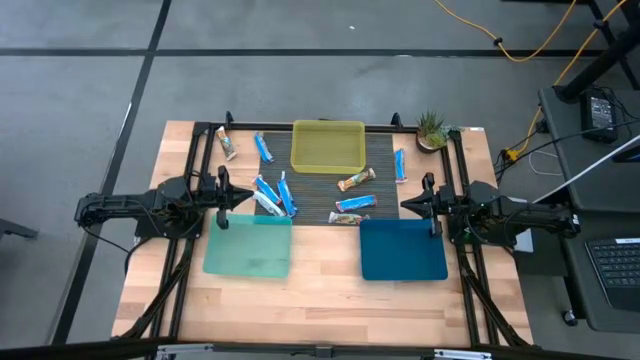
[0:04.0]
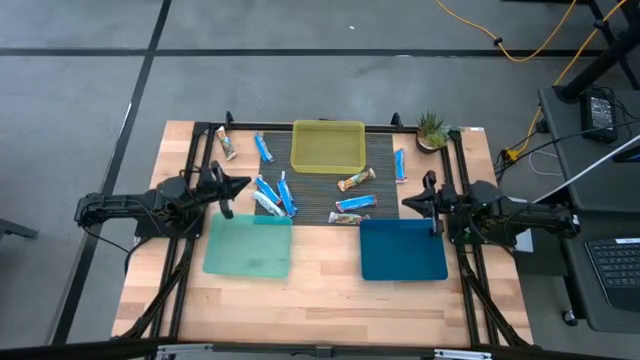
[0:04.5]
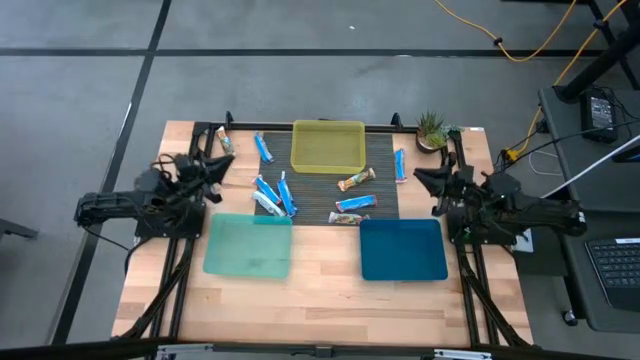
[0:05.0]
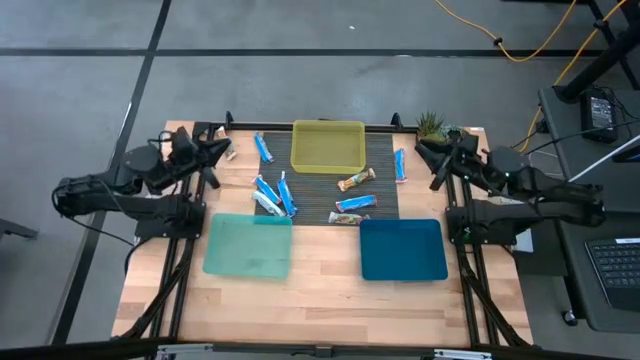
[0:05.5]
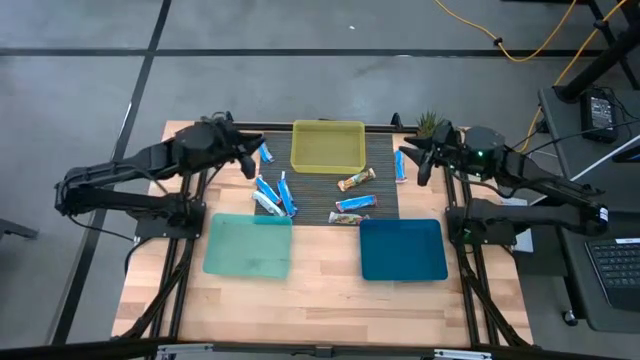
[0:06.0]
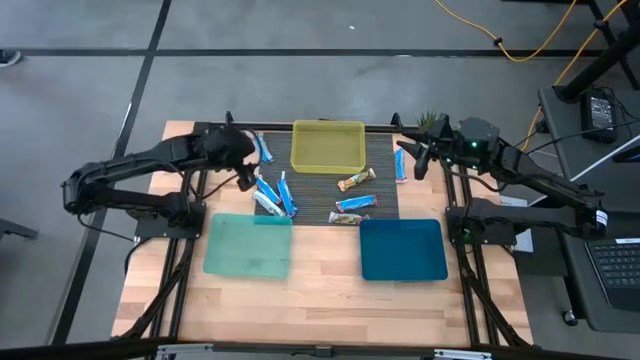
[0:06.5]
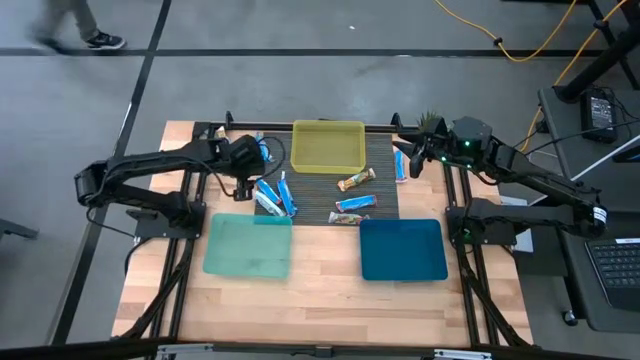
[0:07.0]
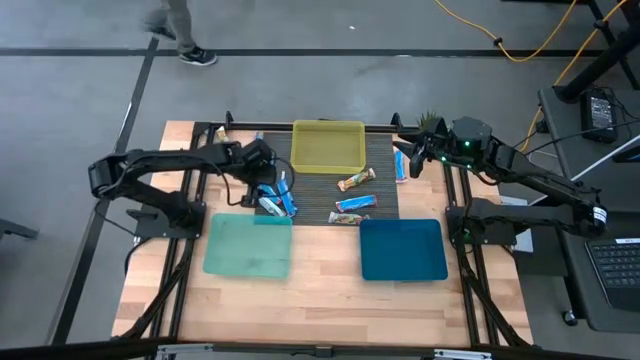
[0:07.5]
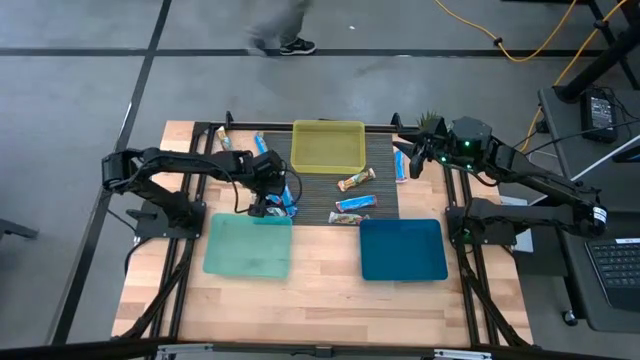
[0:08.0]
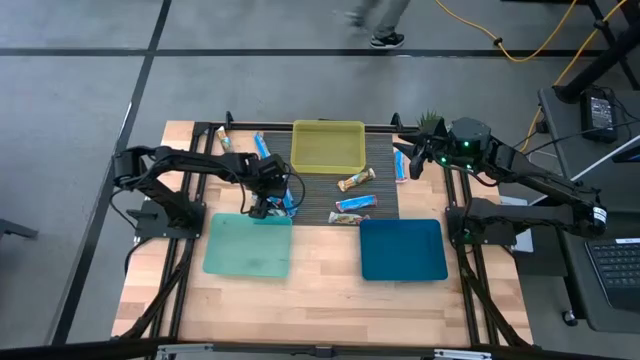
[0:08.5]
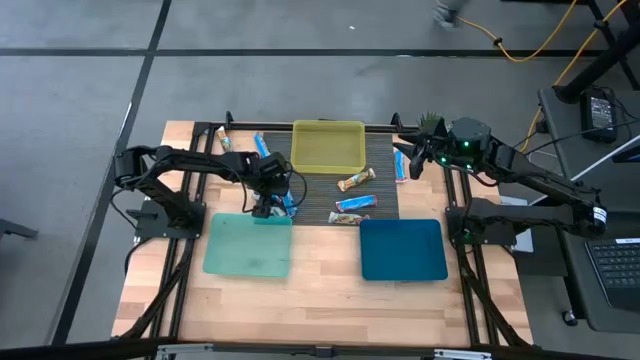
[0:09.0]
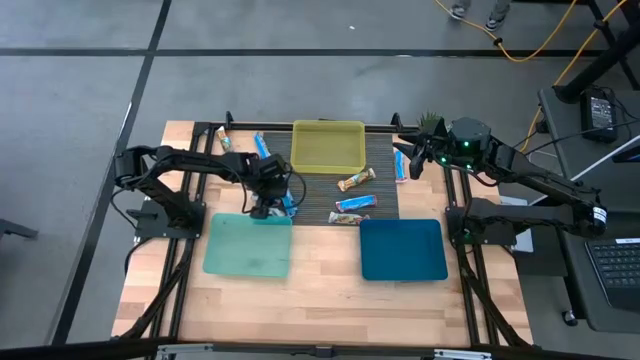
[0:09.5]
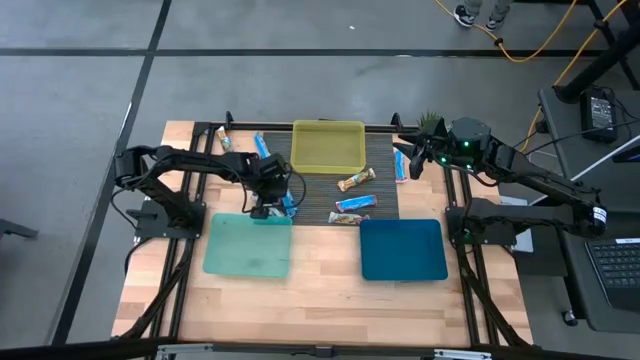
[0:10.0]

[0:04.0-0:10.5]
Task: Pick and place Granola Bars by type
Put the red granola bar into the green bin

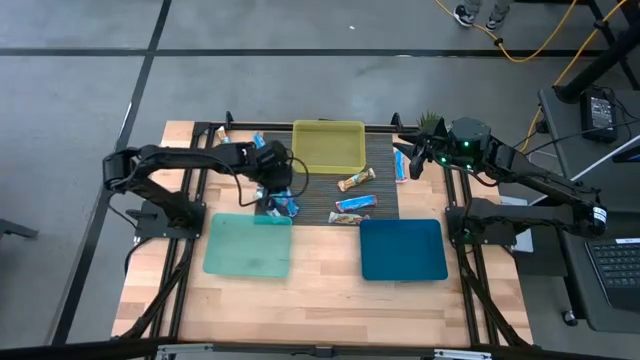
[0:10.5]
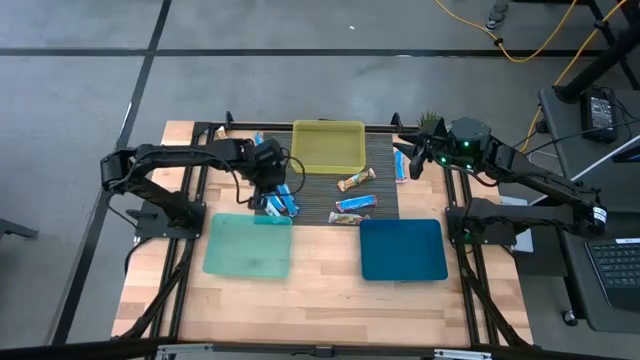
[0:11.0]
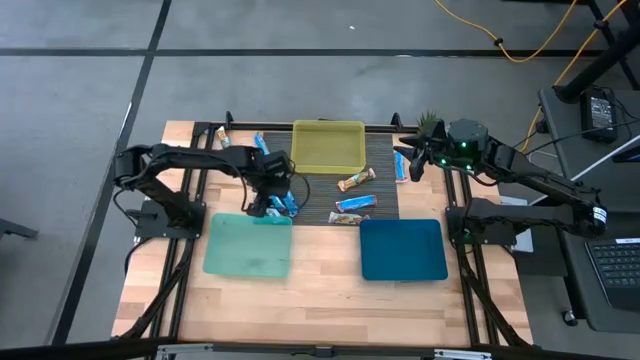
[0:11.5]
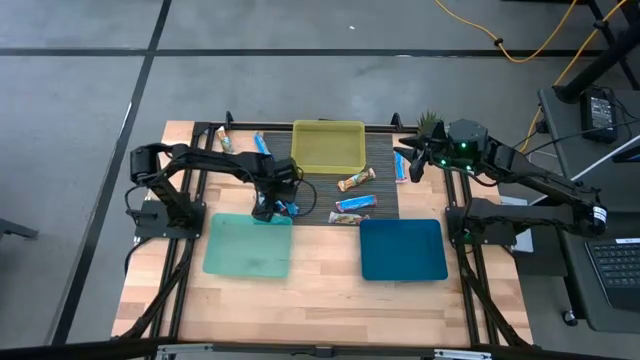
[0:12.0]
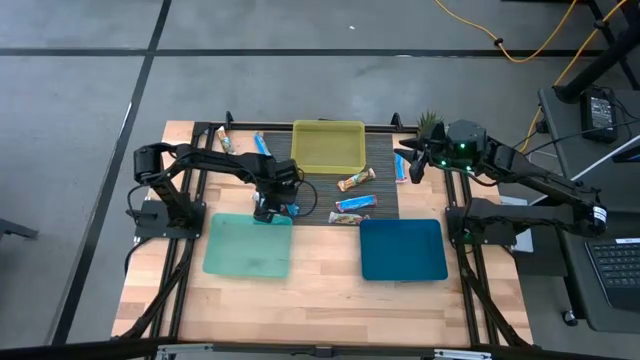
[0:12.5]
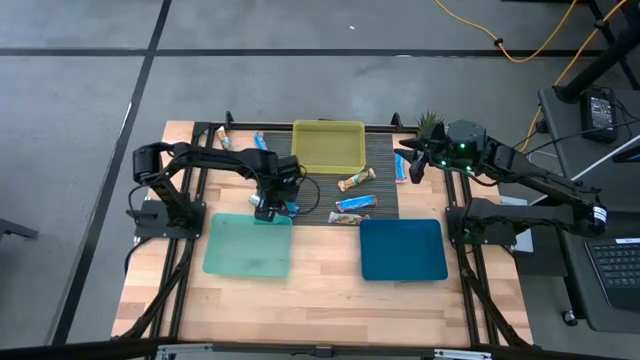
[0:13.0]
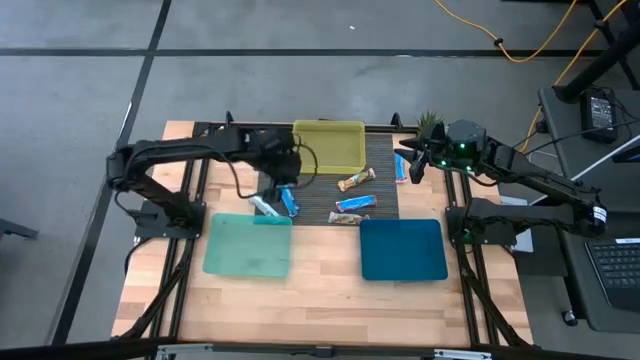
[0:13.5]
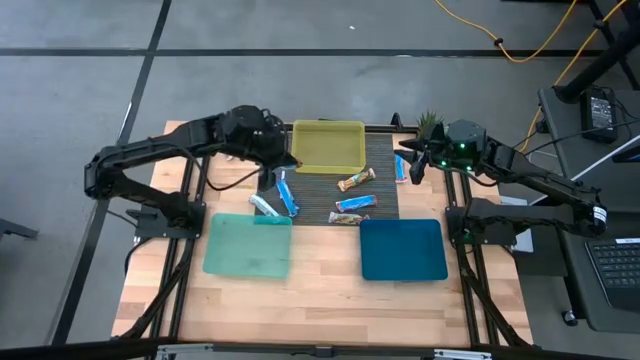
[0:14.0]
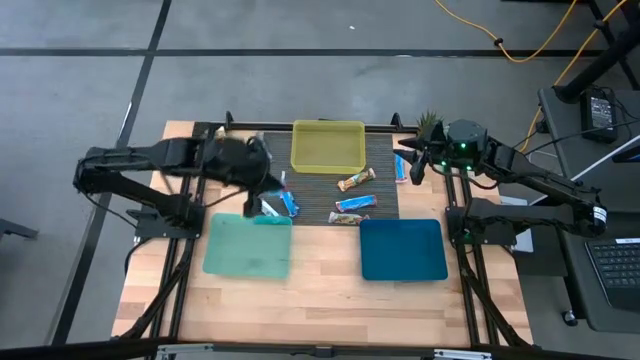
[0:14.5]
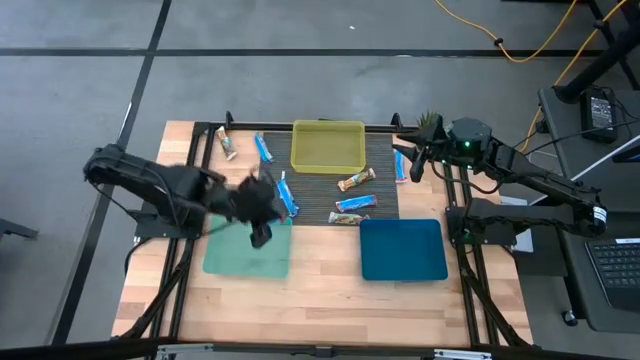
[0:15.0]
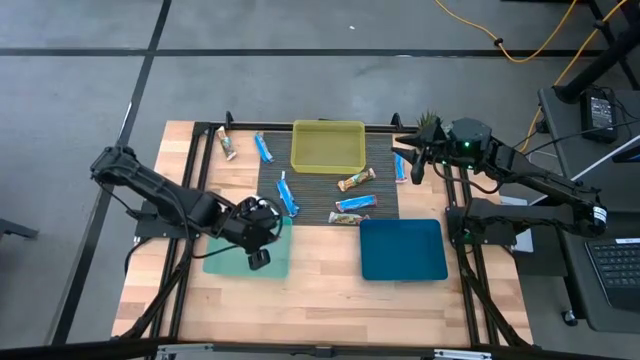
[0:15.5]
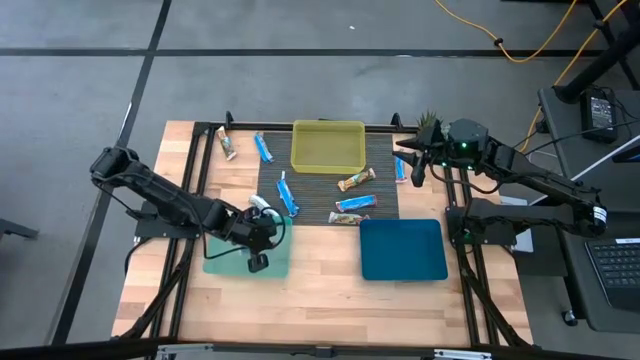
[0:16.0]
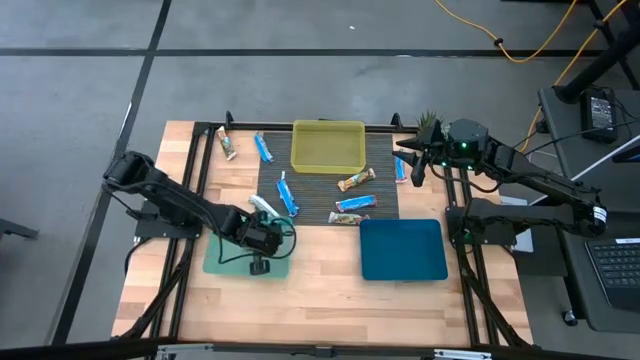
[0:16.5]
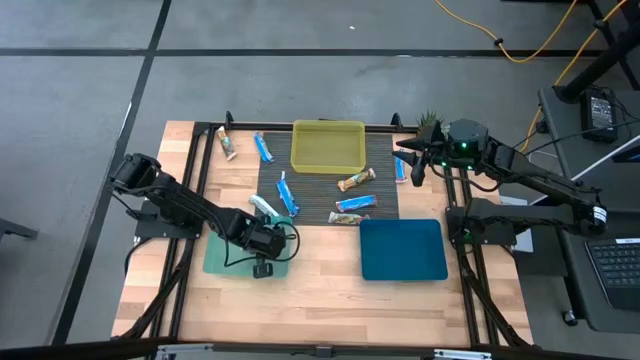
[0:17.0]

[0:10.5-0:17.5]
Put the red granola bar into the green bin

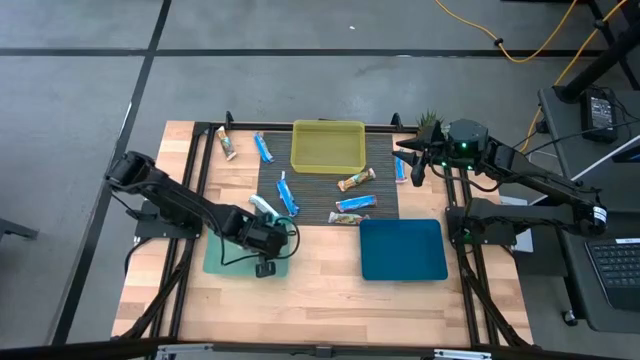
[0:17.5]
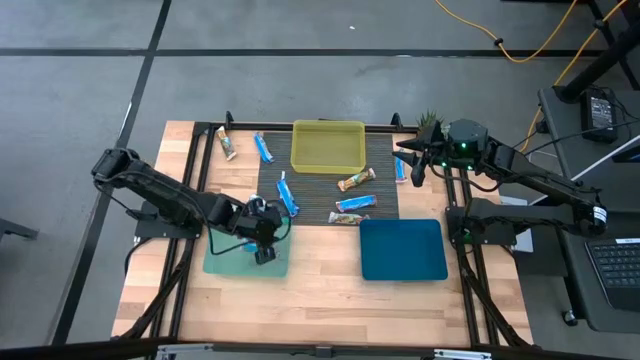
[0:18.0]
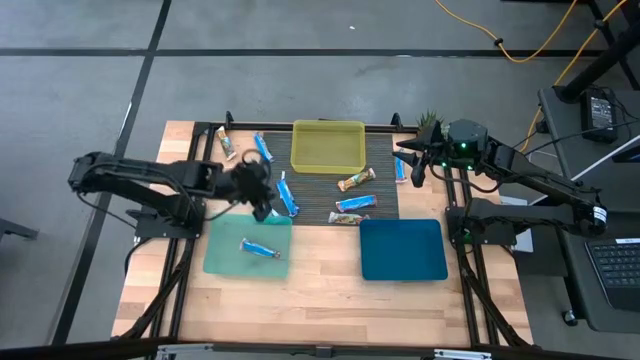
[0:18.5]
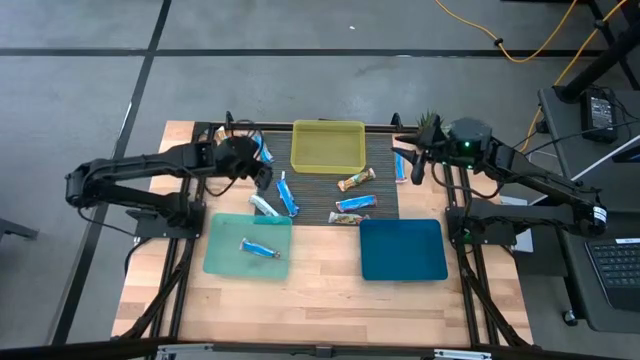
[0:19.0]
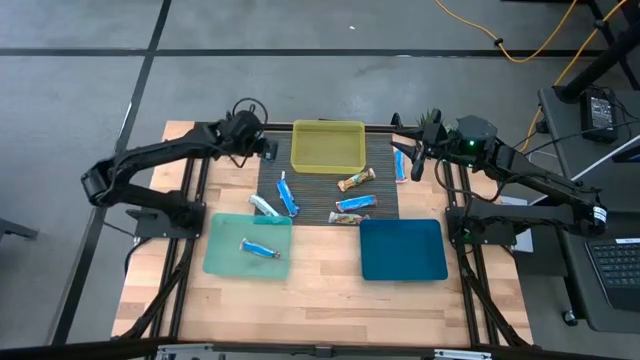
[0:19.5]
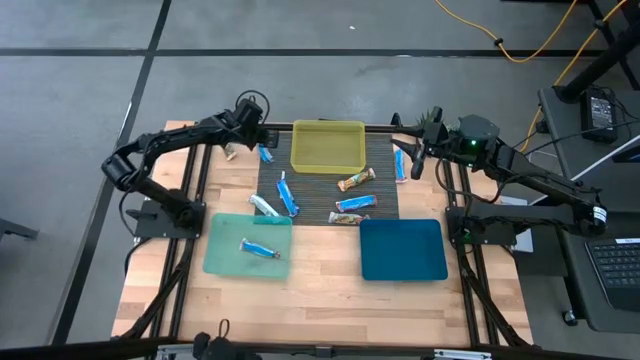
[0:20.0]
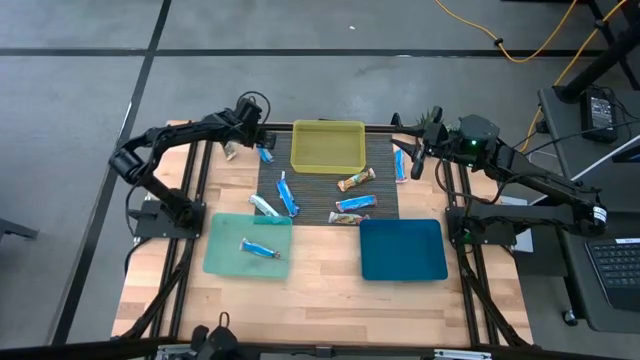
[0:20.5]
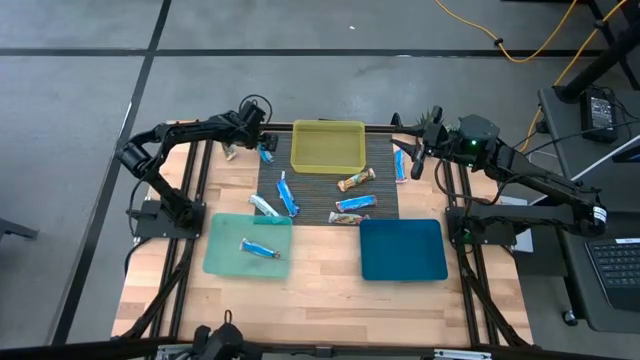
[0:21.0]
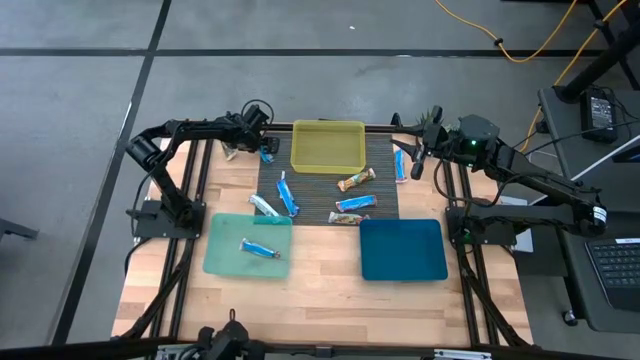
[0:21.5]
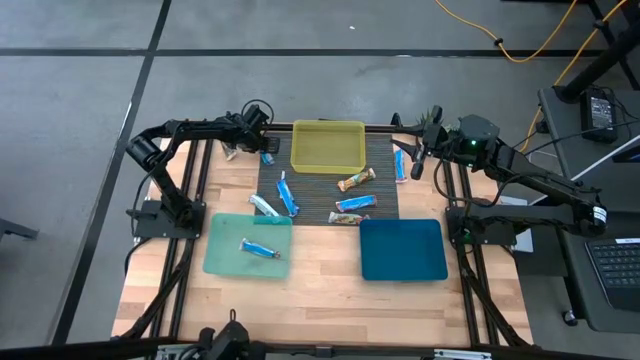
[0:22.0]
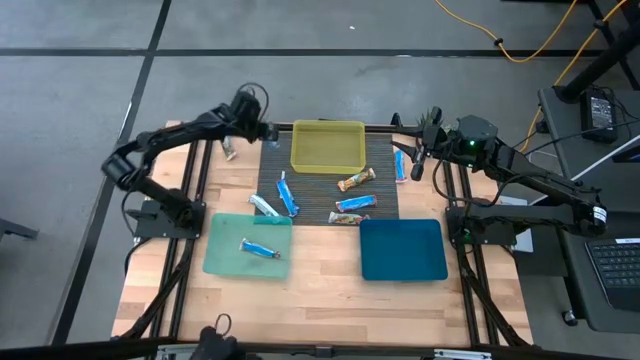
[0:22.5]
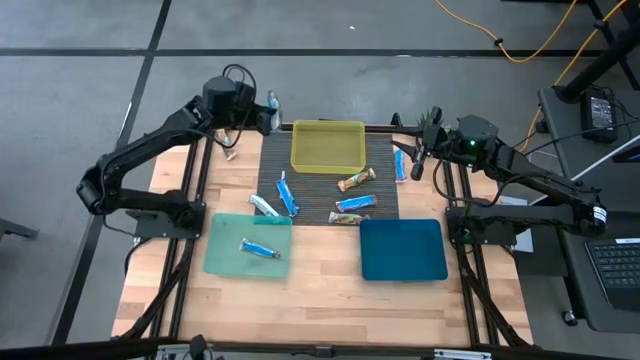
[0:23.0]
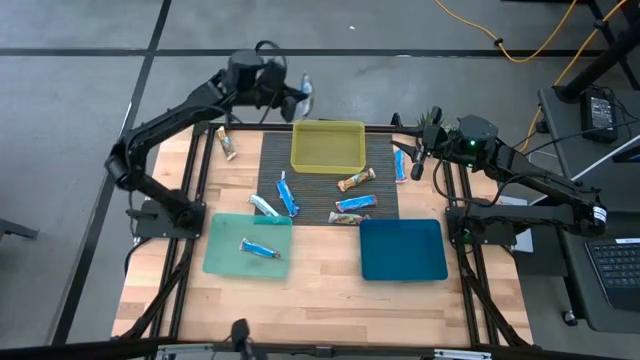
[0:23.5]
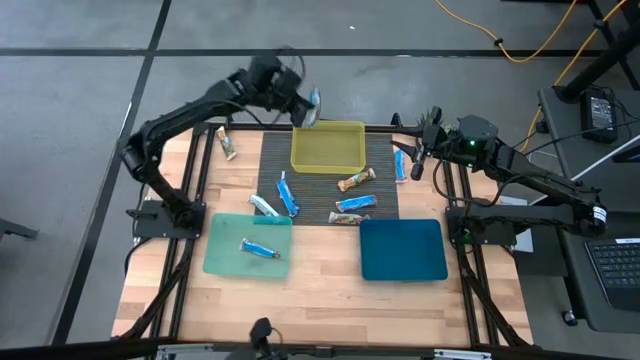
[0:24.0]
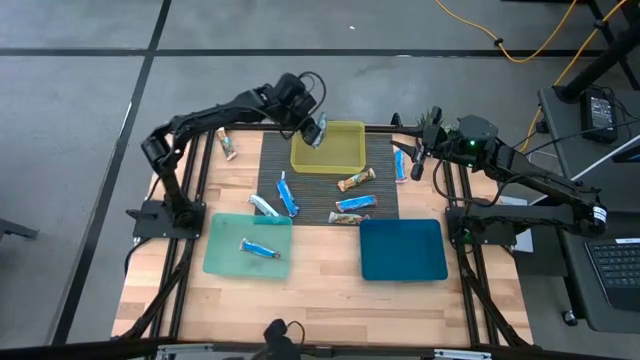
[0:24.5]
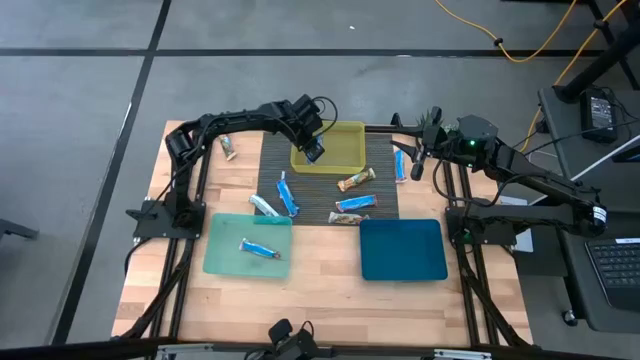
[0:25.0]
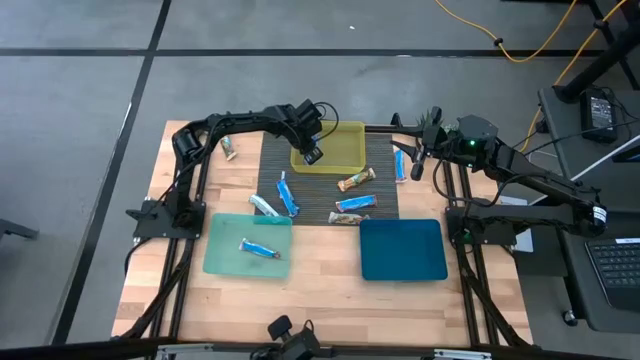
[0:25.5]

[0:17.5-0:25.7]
Put the blue granola bar into the yellow bin
